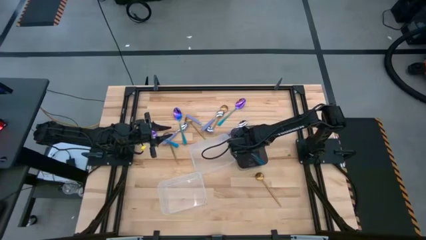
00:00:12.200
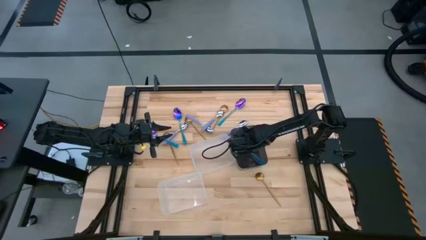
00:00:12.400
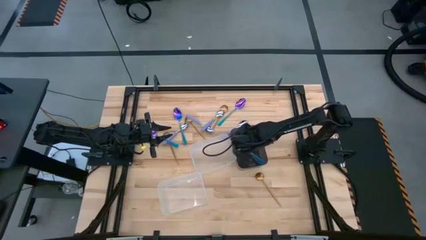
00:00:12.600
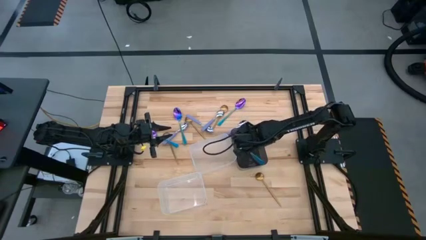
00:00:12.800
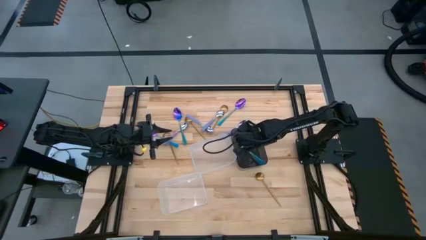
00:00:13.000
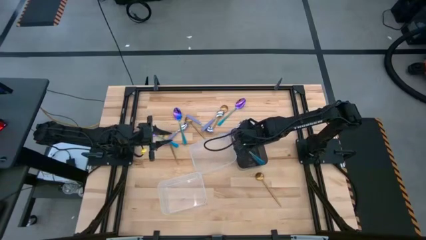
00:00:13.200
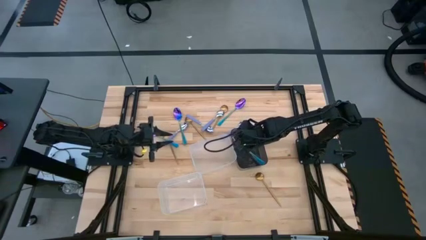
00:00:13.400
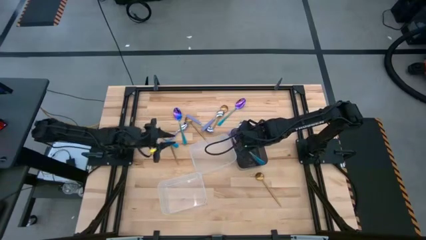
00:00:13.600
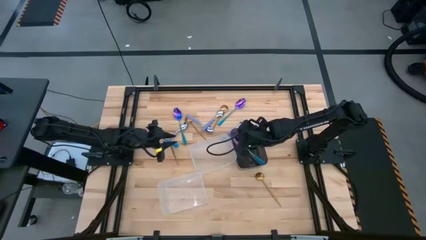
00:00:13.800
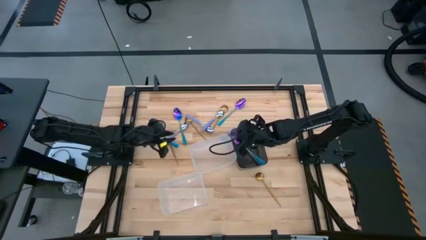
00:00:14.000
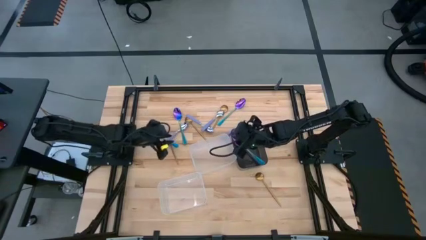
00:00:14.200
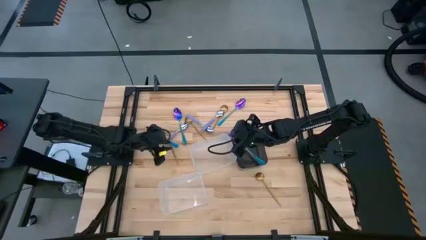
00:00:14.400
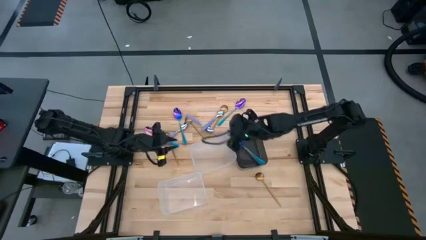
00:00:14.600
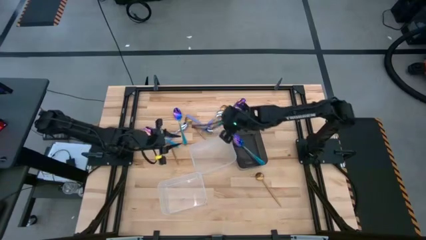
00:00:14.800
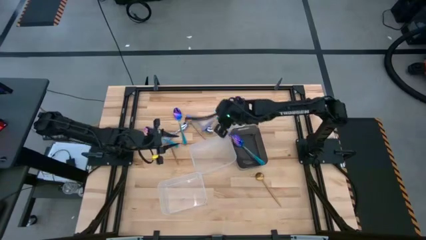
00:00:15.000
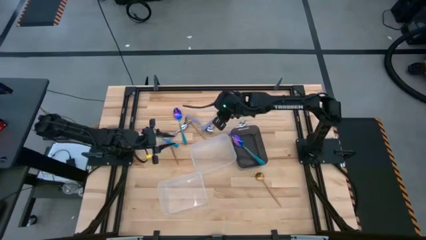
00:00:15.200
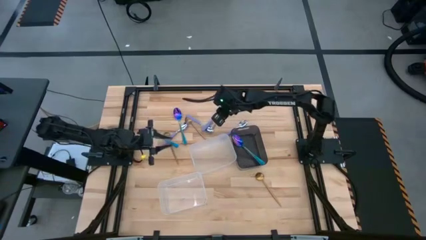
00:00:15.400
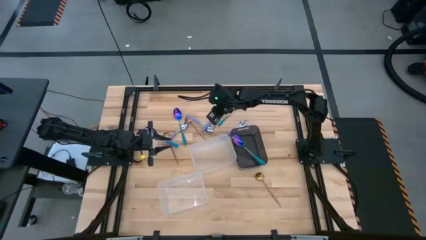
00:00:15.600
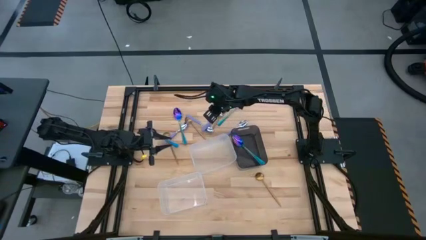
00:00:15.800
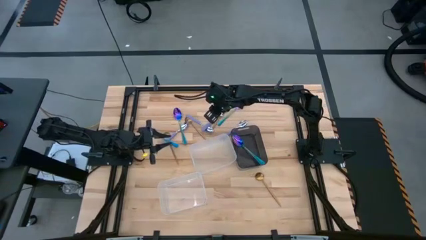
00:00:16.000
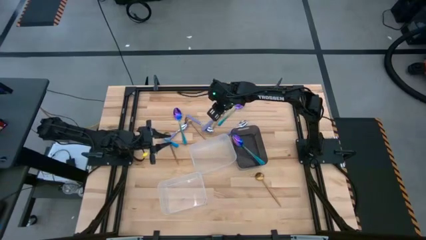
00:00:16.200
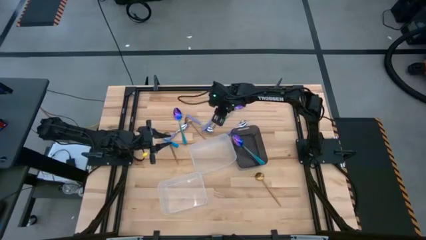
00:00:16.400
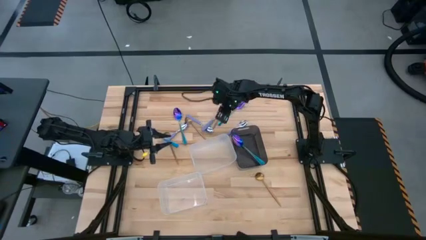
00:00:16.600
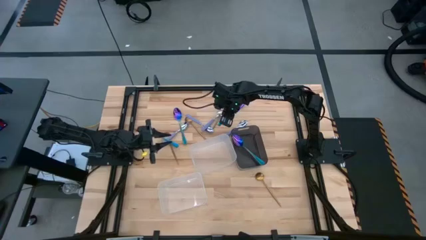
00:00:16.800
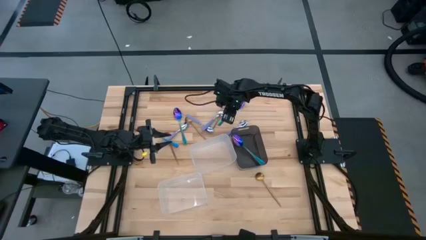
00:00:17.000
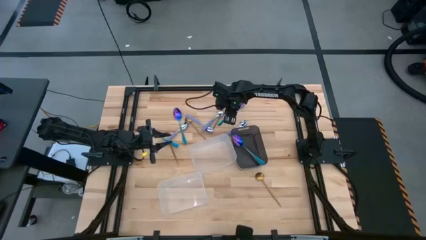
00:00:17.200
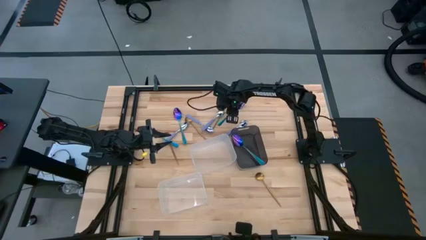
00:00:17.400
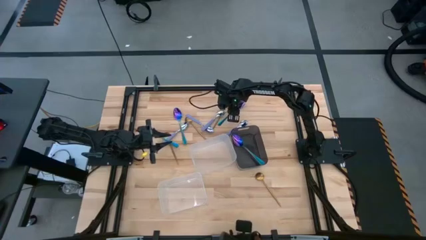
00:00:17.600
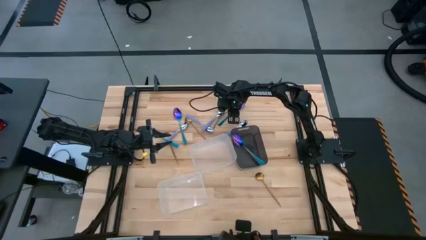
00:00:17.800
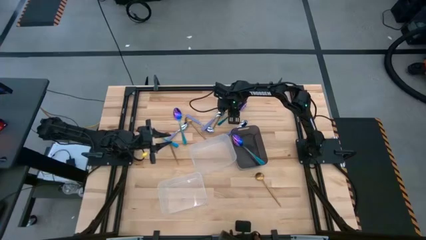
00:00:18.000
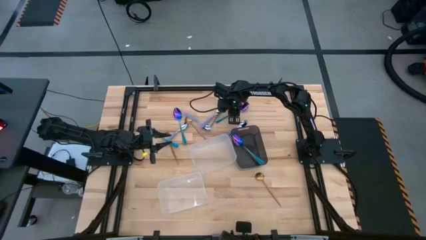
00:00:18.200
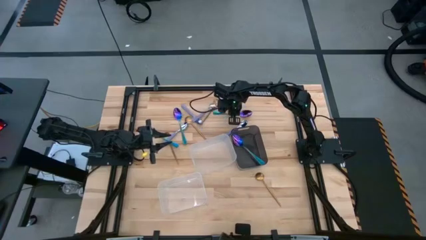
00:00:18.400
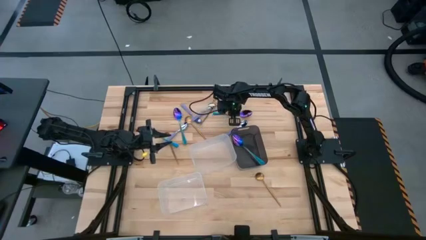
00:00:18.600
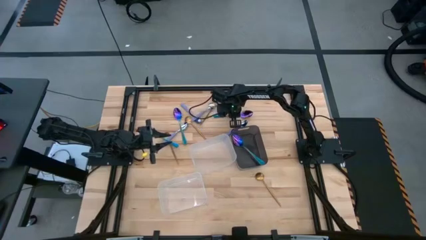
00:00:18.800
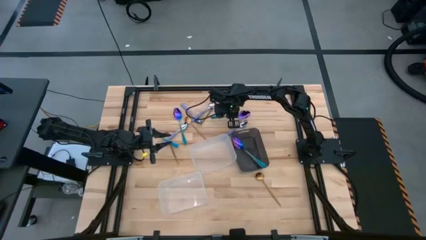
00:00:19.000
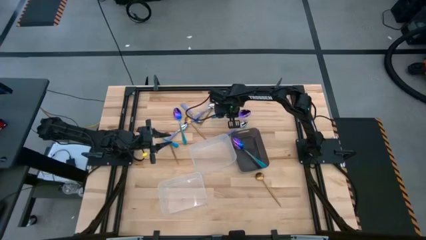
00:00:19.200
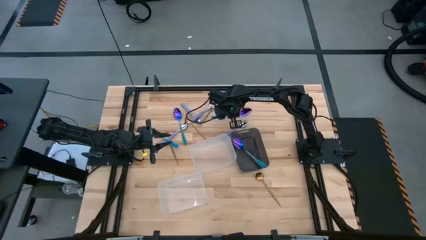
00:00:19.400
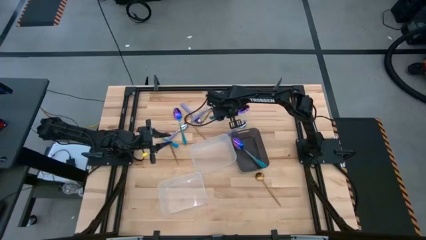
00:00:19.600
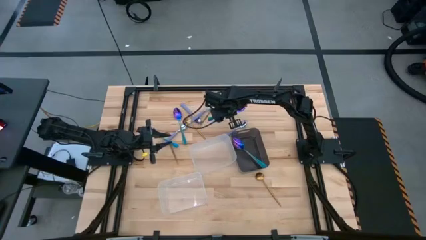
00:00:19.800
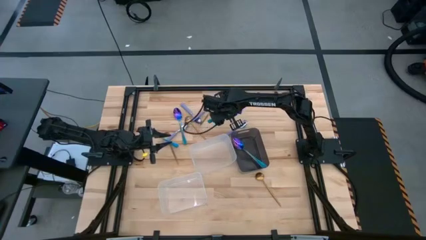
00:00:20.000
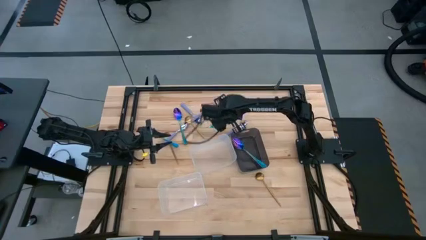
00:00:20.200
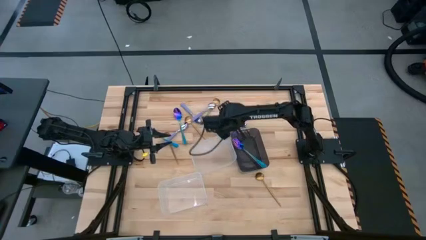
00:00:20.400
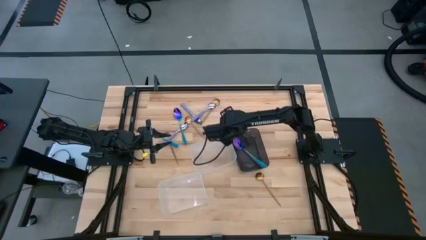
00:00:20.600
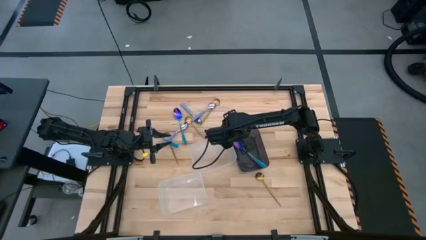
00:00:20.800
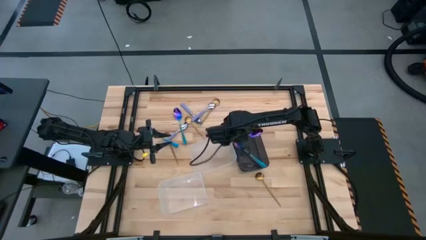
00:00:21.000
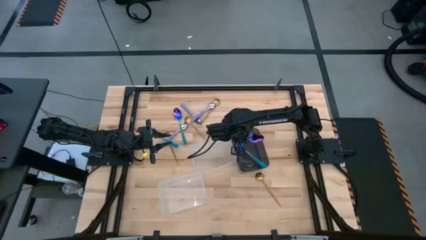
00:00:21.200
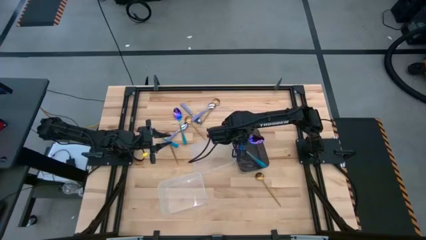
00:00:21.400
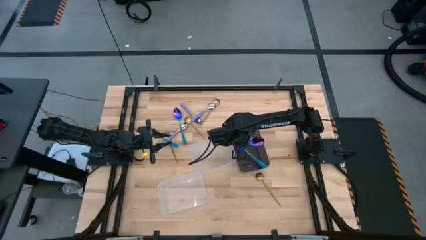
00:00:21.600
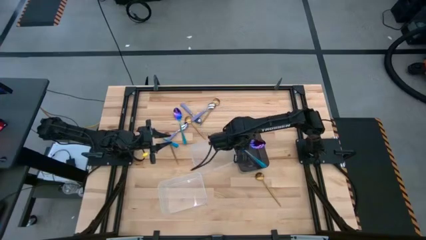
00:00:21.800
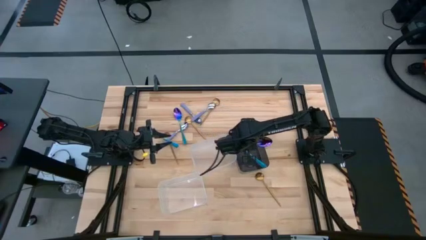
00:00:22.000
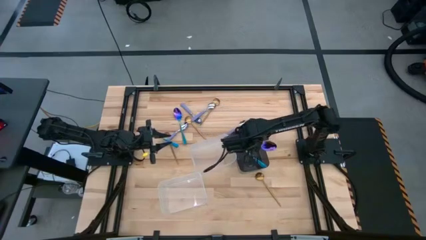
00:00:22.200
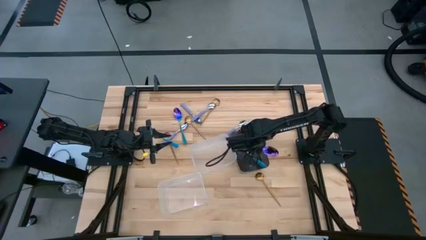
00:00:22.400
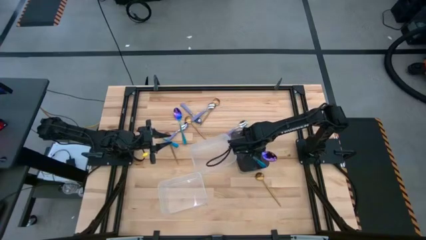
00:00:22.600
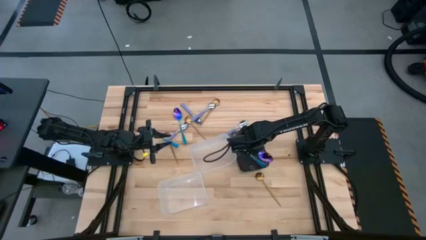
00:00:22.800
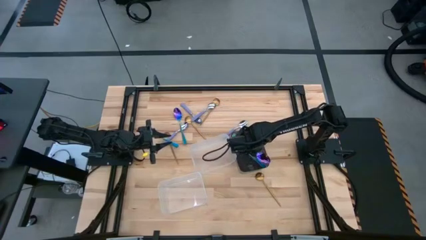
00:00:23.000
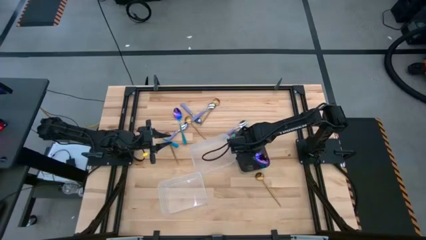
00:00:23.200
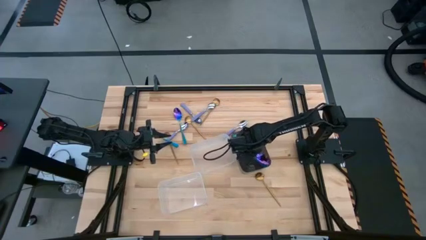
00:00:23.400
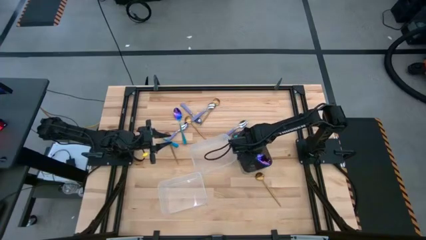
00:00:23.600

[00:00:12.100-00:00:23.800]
Task: Sort silverware by color (type)
Put the violet spoon into the black bin
